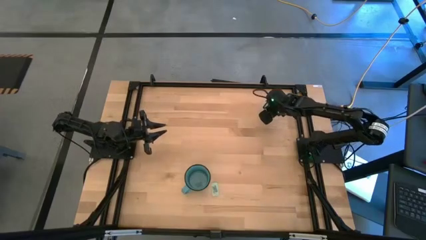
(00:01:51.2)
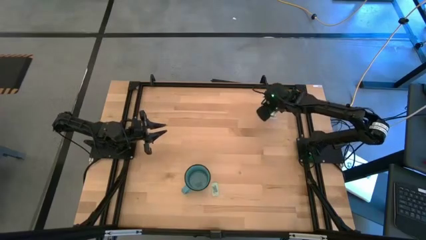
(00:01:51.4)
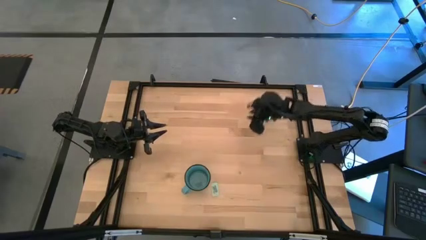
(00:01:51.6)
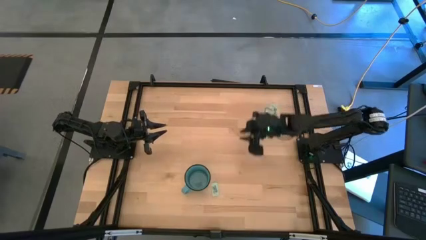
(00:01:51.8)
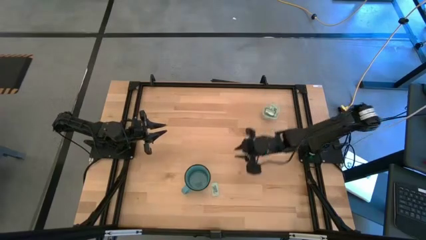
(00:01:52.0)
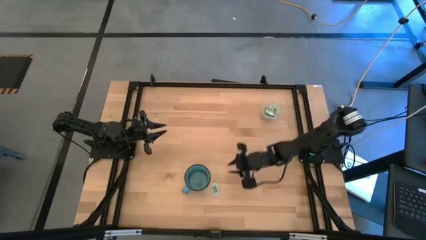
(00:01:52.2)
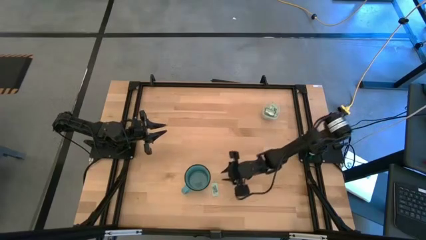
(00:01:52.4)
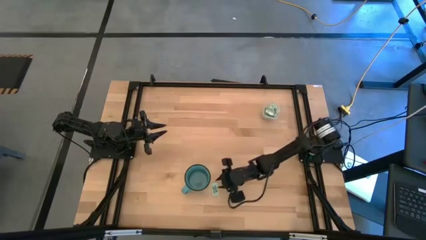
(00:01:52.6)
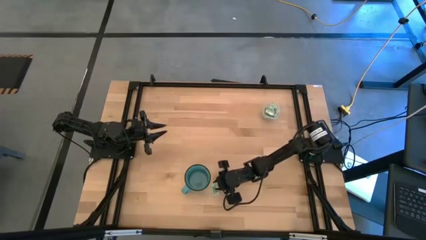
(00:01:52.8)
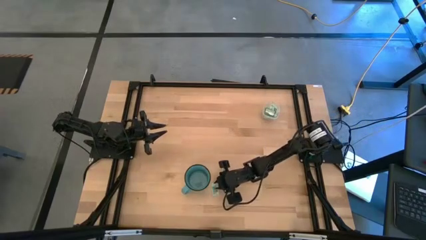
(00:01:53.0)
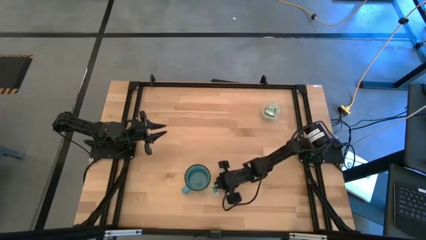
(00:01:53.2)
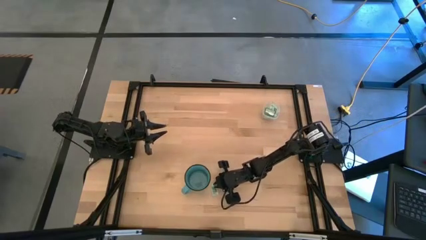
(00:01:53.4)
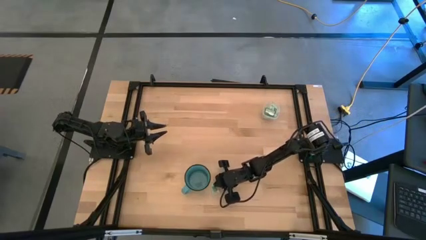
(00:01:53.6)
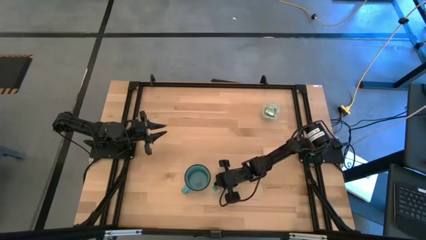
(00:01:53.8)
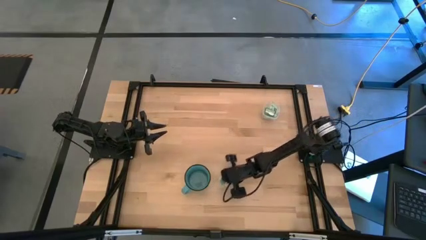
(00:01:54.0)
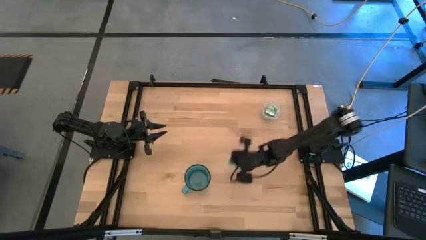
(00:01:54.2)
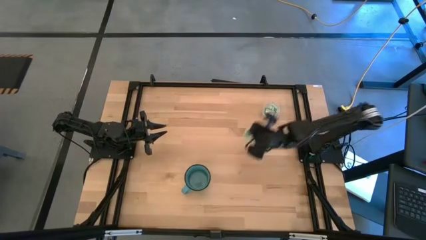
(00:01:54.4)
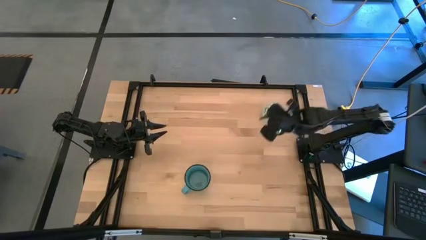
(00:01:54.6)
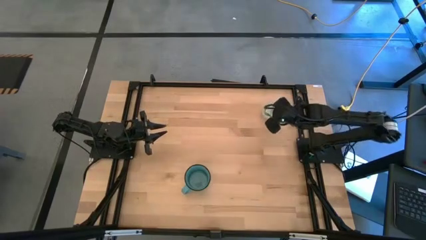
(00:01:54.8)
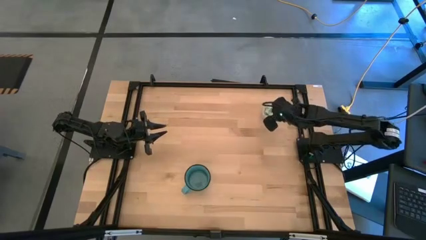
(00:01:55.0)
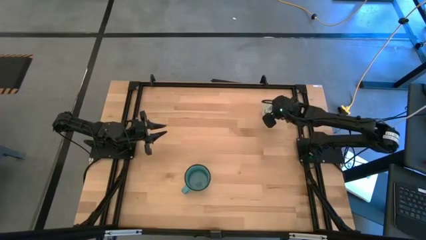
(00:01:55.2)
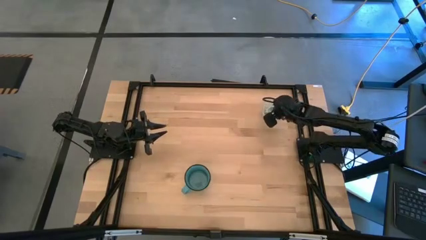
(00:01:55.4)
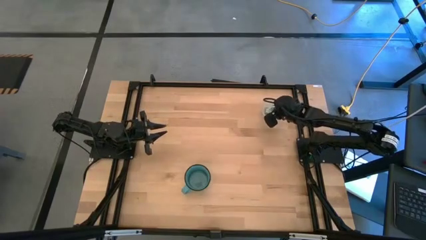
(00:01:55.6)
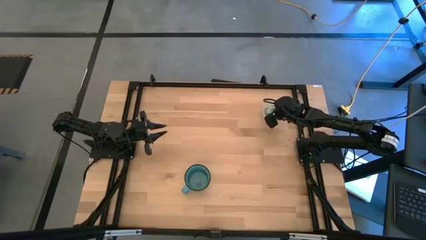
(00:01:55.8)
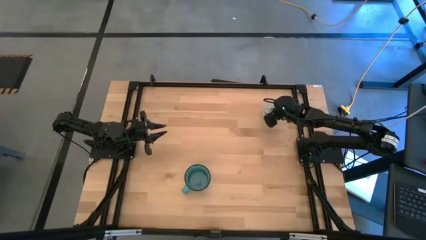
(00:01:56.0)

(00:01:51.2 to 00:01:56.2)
Task: Pick and place items into bin
Put the stevia packet into the transparent bin

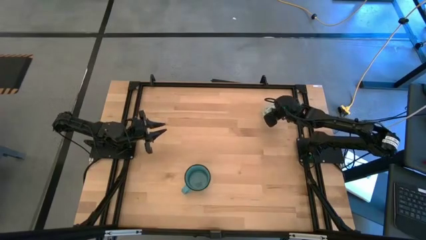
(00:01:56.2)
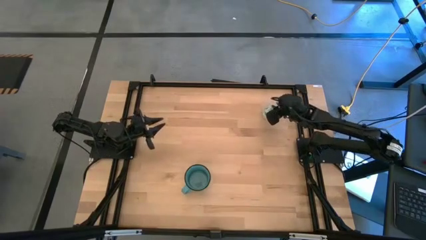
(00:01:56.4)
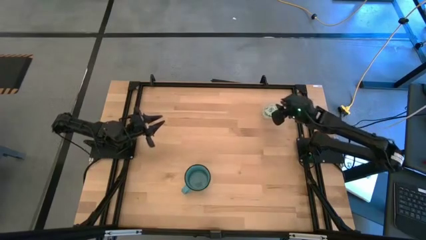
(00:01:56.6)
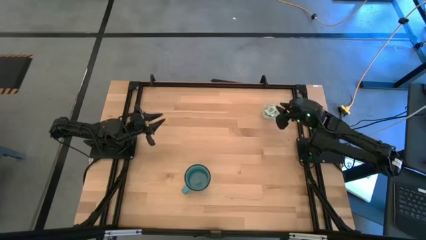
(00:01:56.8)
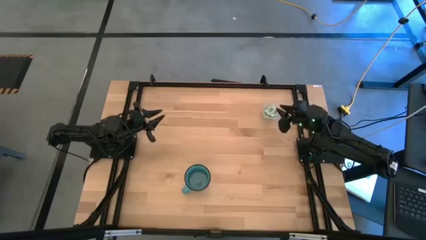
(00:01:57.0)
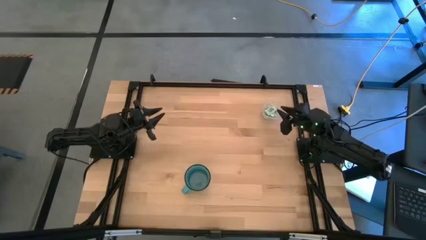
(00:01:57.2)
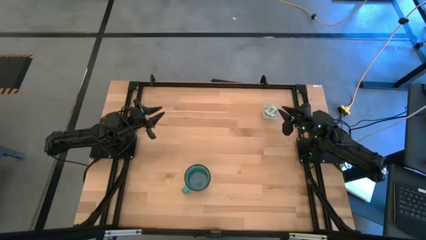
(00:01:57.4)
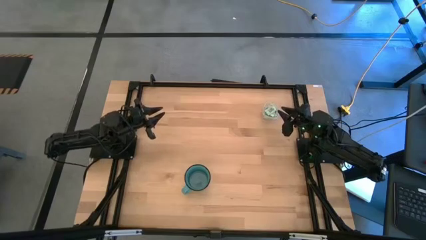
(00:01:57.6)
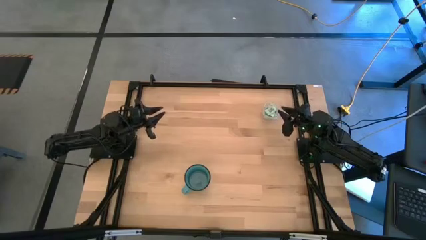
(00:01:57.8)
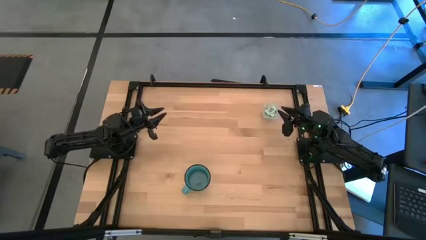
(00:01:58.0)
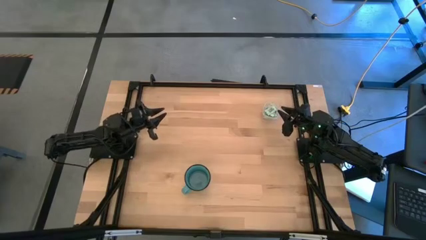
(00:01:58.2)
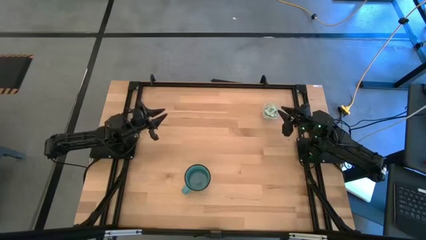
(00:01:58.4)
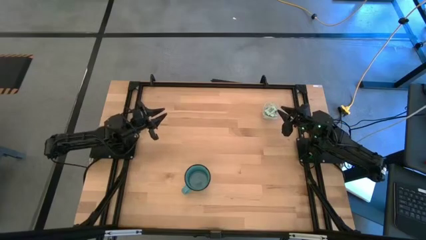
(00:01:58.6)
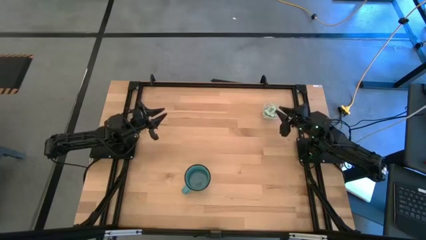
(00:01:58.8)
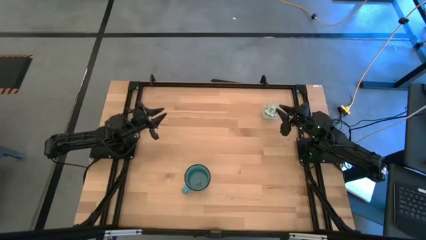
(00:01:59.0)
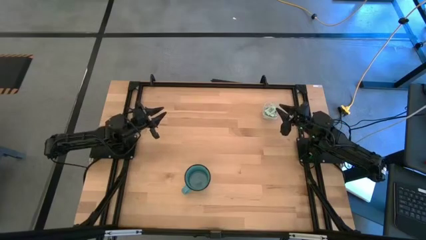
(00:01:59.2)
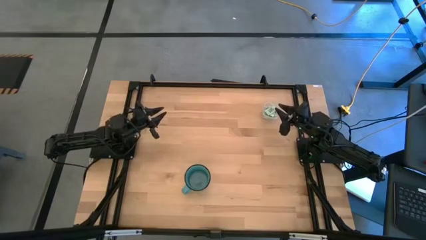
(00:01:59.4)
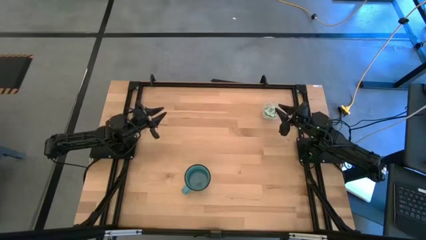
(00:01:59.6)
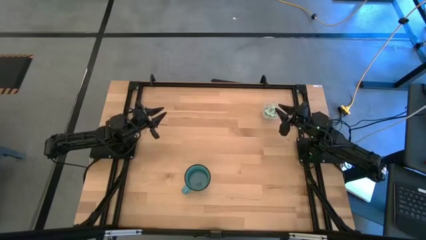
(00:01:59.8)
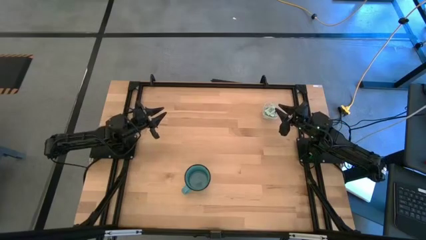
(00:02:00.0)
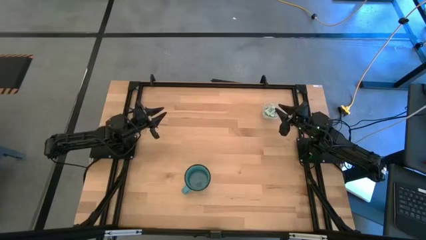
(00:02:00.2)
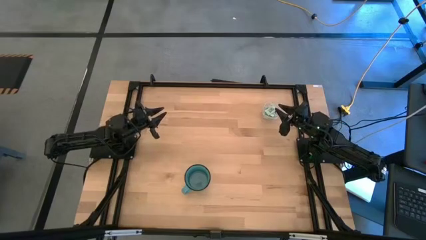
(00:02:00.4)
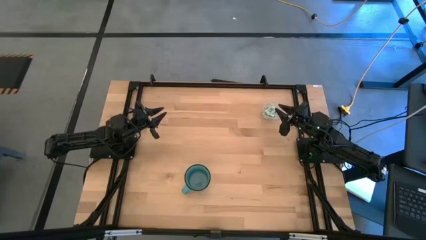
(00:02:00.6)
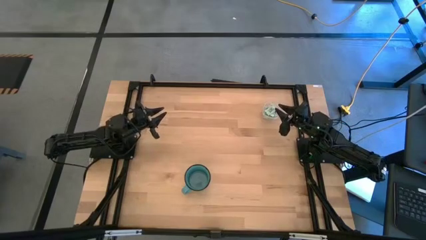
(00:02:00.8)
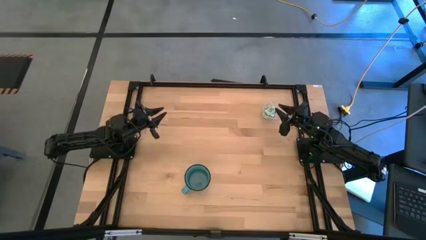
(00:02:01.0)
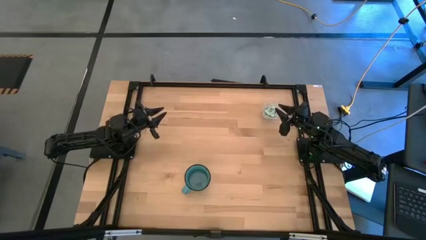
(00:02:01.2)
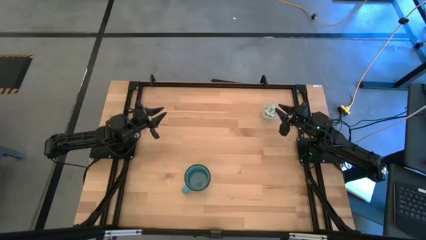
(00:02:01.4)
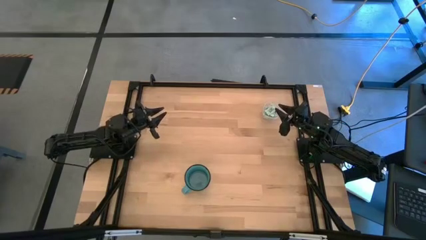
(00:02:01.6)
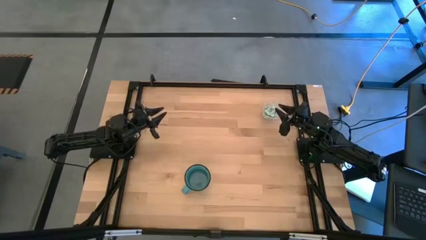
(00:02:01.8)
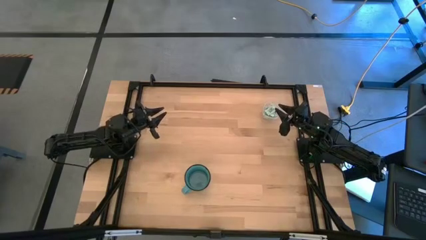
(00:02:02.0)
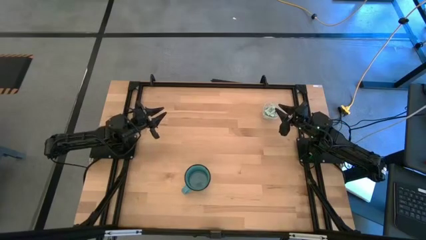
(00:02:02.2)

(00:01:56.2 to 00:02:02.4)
Return to Home Position

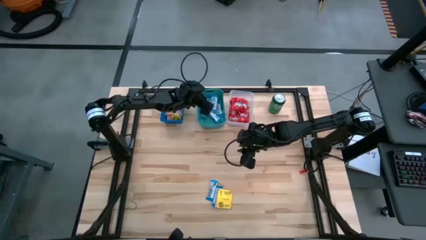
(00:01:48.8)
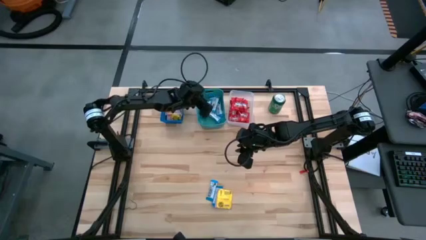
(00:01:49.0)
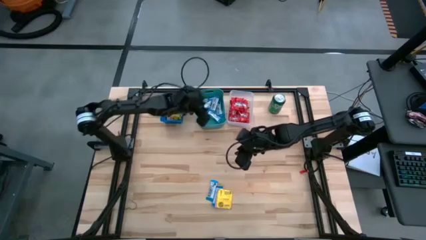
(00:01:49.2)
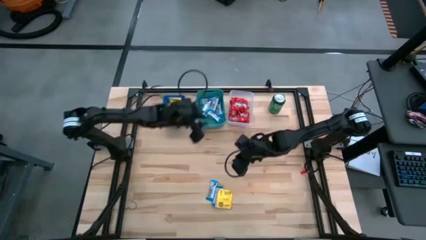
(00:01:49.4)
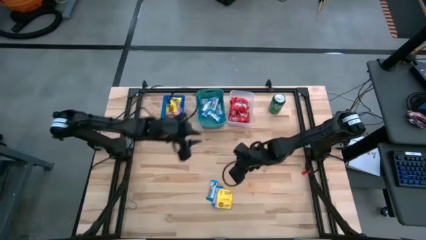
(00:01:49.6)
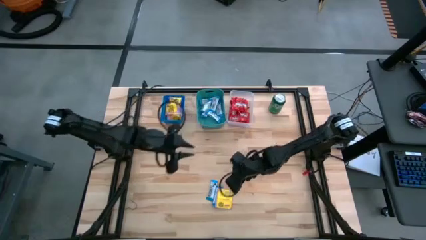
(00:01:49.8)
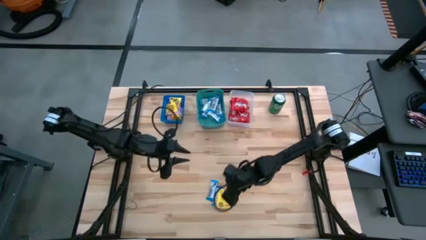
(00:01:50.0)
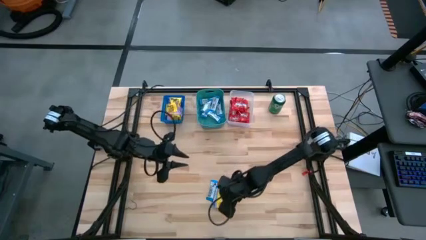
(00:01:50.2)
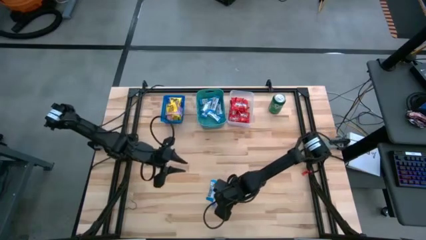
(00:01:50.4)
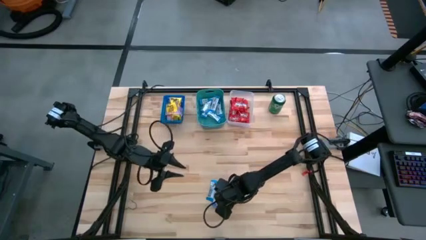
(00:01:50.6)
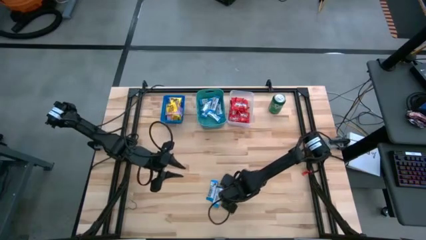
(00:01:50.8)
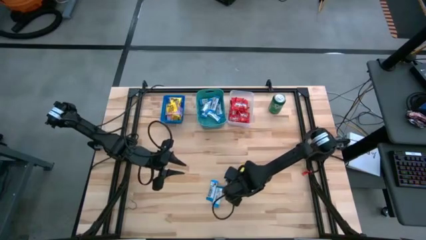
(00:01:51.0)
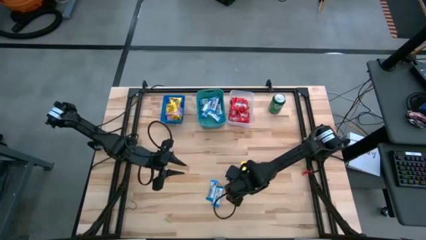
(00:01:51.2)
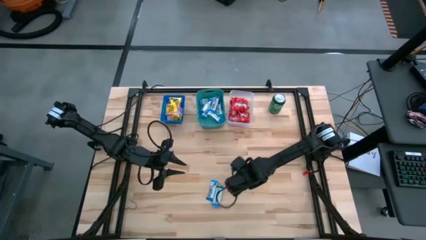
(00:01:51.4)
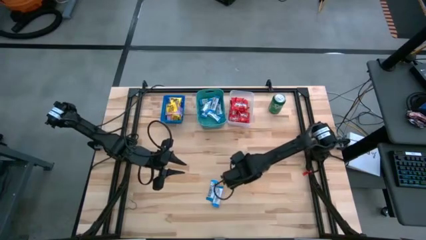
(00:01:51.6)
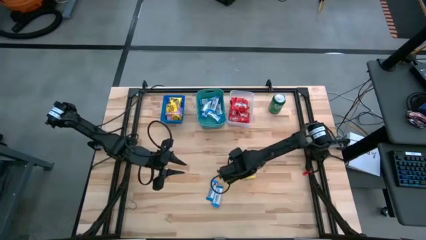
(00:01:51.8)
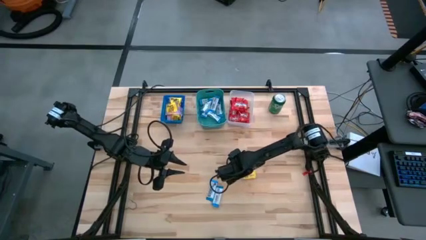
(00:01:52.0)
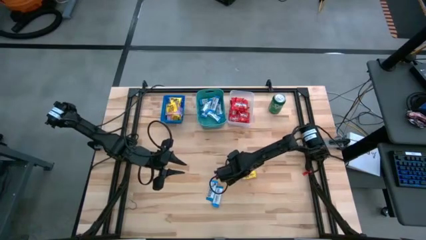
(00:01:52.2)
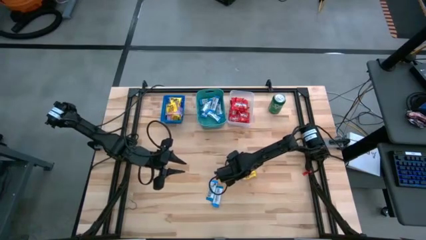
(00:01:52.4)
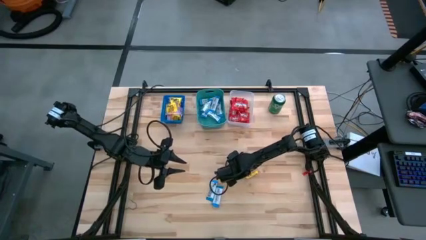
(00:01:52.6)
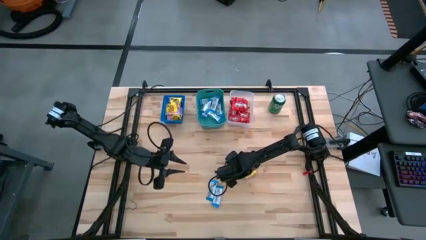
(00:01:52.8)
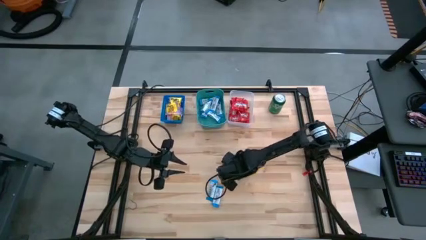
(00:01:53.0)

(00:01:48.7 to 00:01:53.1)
Task: Sort candy
Put the yellow candy into the blue bin

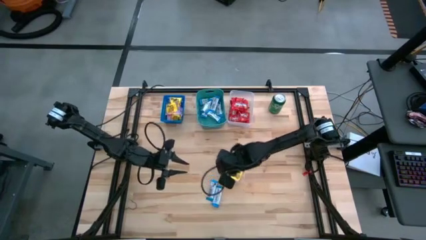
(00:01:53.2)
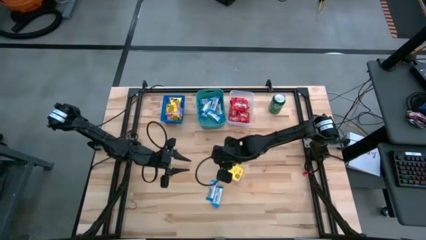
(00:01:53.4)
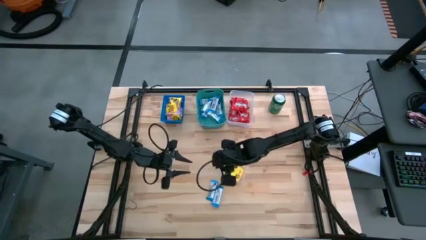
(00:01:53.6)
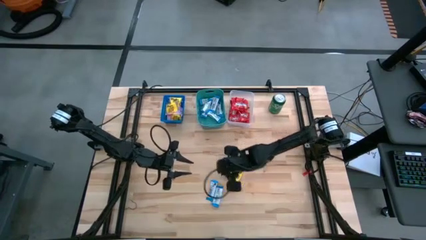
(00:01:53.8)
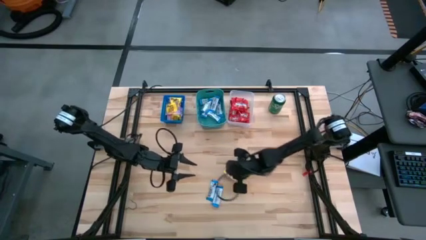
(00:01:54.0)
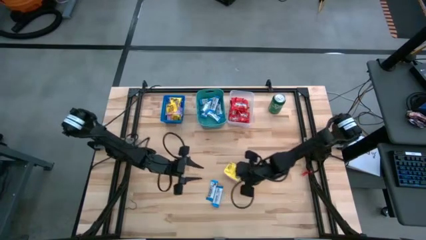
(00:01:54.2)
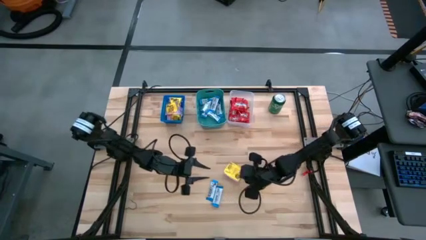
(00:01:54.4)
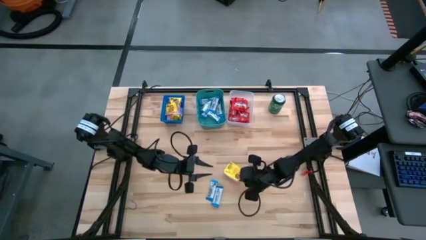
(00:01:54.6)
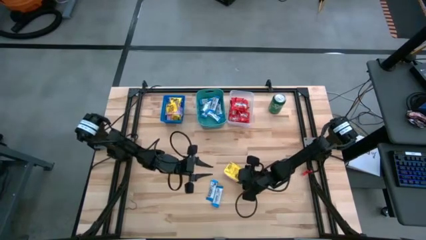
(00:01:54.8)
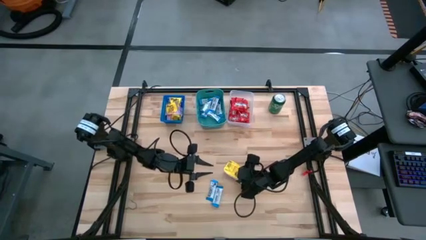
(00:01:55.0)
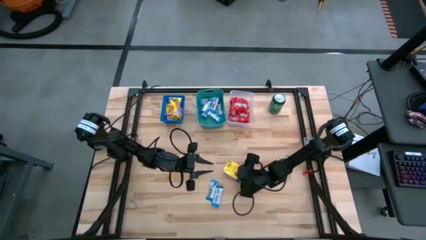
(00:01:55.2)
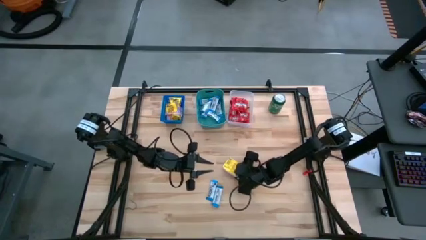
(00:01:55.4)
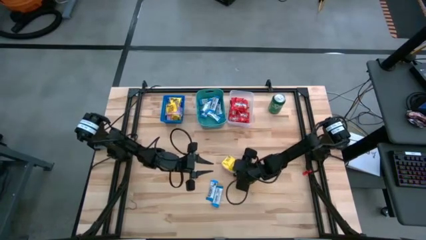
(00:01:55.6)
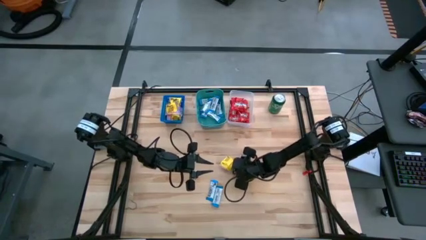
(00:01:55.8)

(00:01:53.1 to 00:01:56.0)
Put the yellow candy into the blue bin
